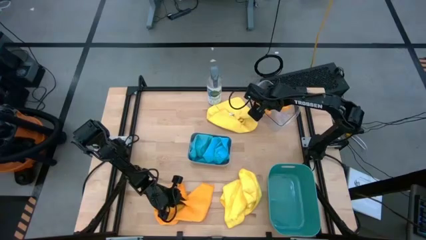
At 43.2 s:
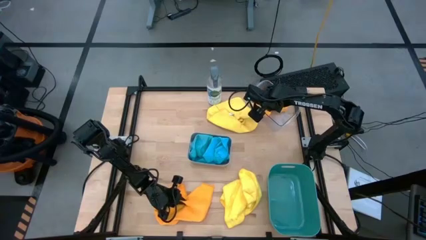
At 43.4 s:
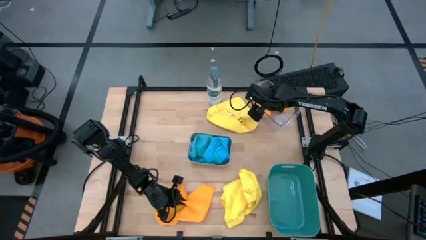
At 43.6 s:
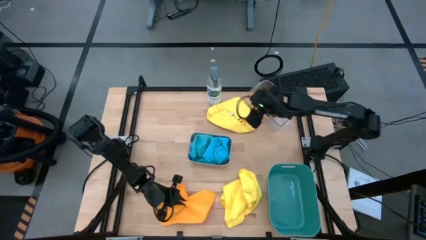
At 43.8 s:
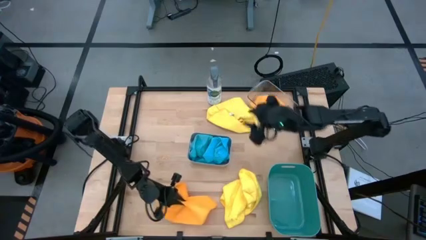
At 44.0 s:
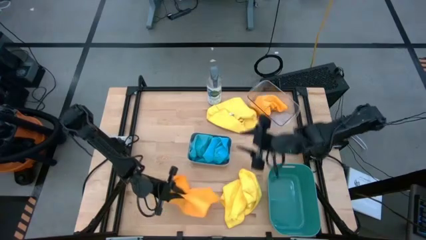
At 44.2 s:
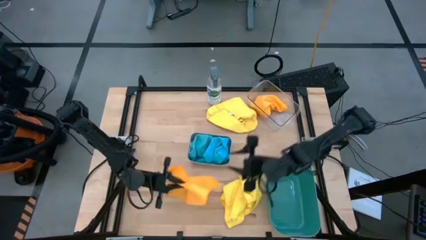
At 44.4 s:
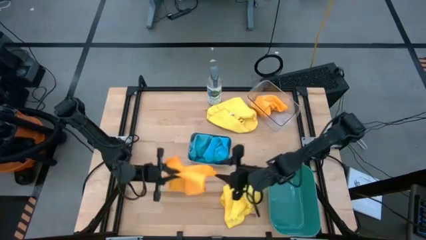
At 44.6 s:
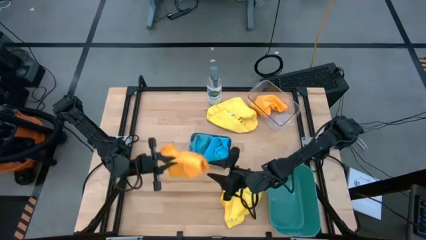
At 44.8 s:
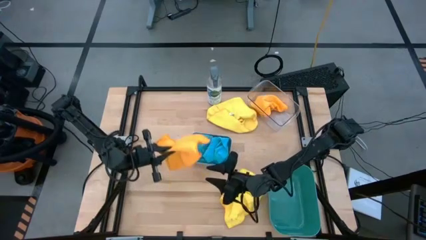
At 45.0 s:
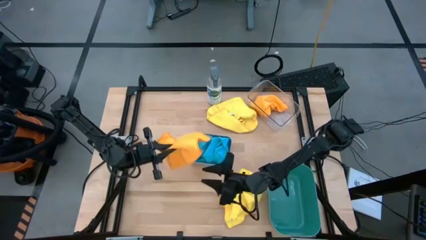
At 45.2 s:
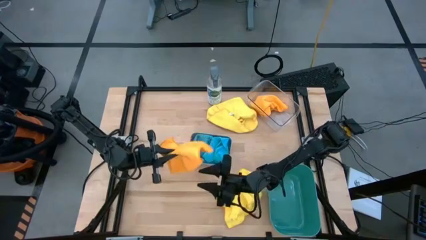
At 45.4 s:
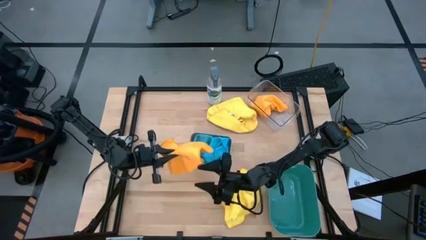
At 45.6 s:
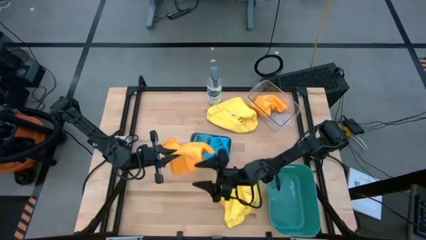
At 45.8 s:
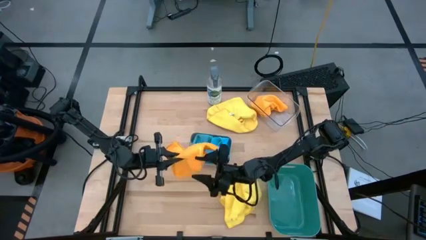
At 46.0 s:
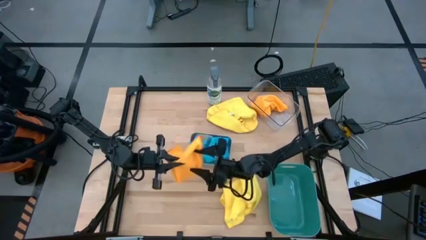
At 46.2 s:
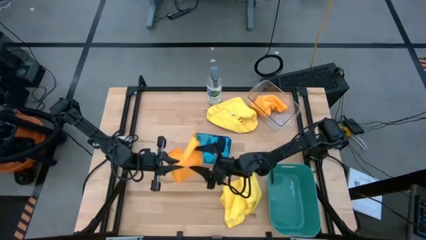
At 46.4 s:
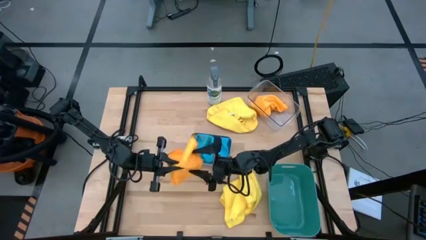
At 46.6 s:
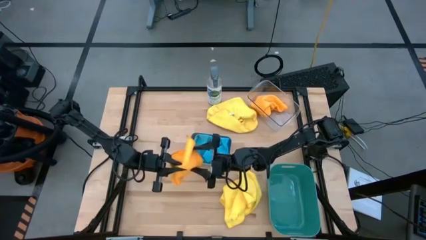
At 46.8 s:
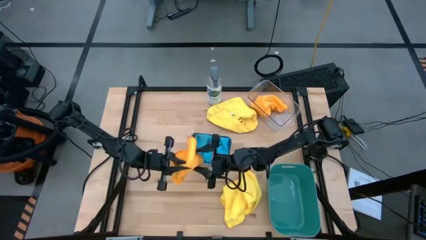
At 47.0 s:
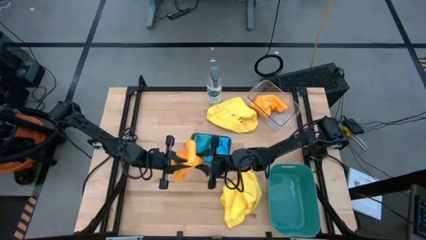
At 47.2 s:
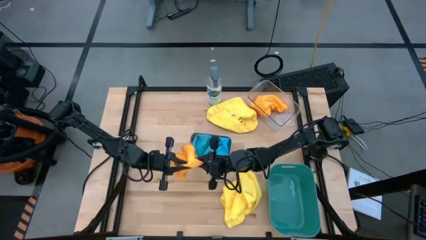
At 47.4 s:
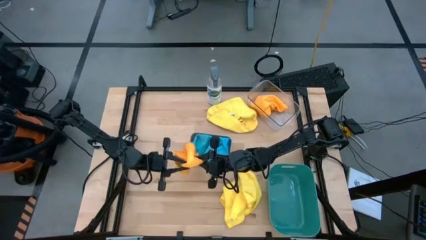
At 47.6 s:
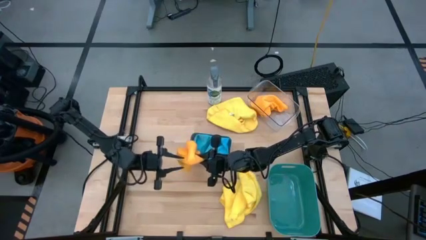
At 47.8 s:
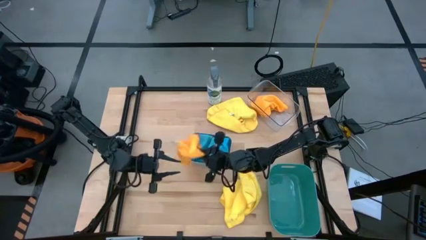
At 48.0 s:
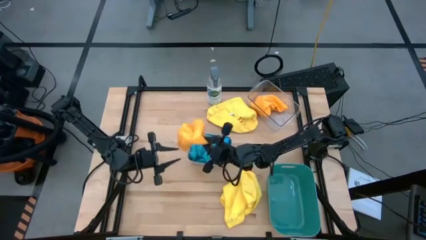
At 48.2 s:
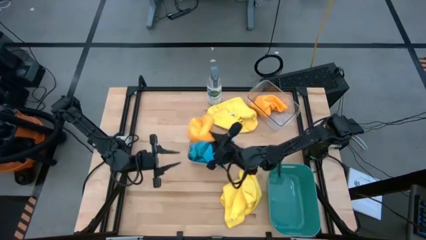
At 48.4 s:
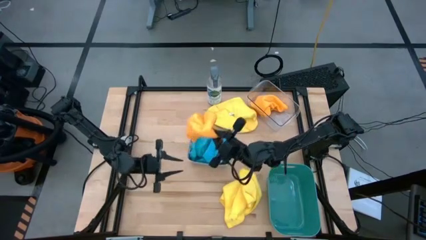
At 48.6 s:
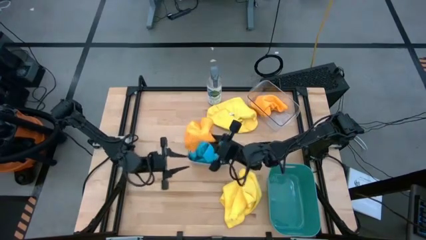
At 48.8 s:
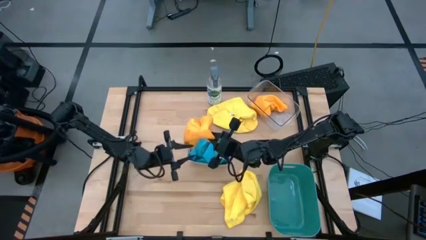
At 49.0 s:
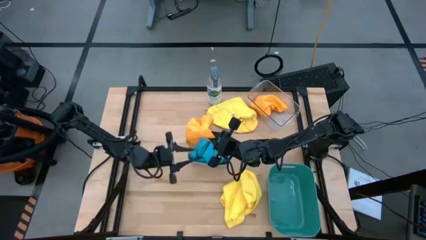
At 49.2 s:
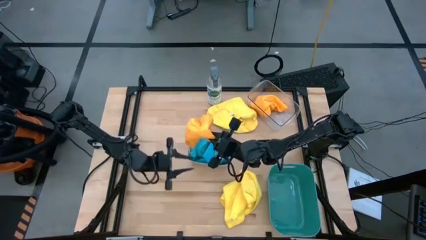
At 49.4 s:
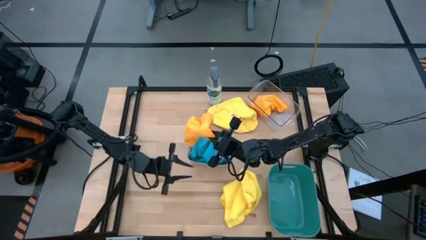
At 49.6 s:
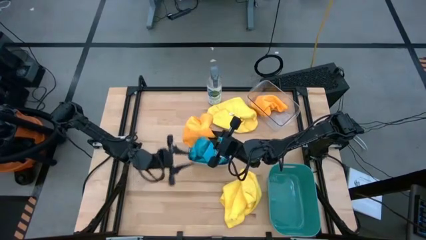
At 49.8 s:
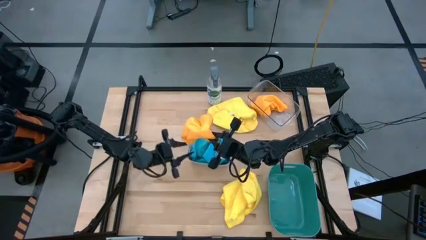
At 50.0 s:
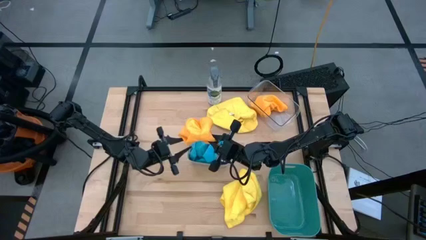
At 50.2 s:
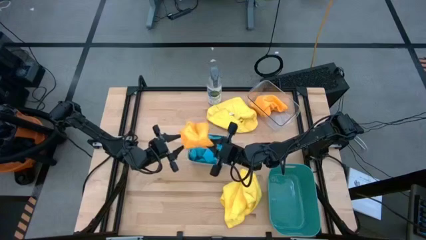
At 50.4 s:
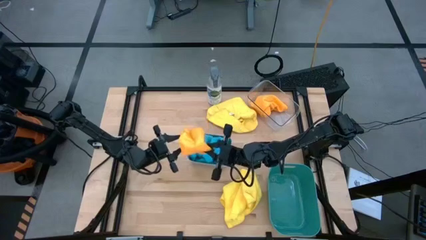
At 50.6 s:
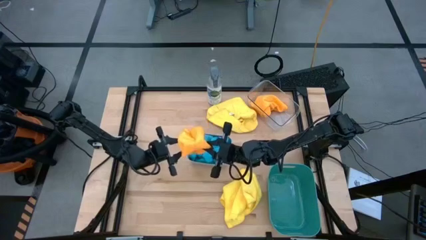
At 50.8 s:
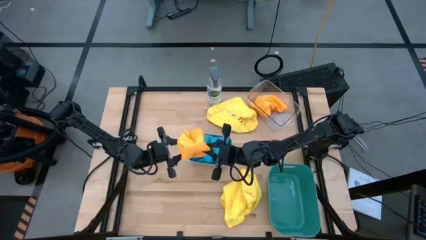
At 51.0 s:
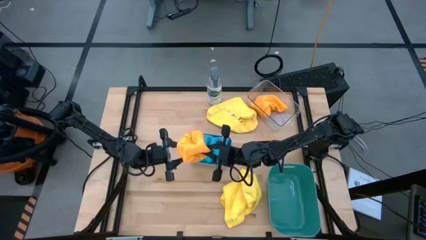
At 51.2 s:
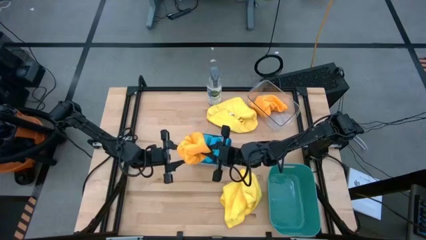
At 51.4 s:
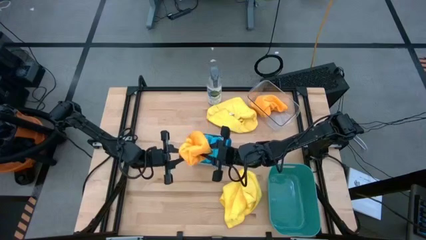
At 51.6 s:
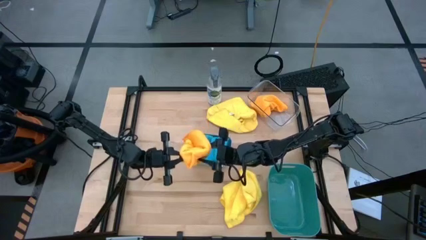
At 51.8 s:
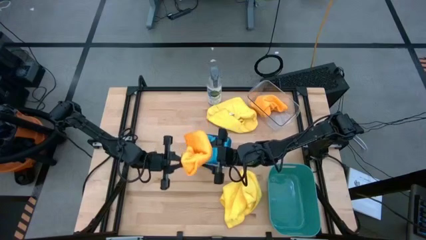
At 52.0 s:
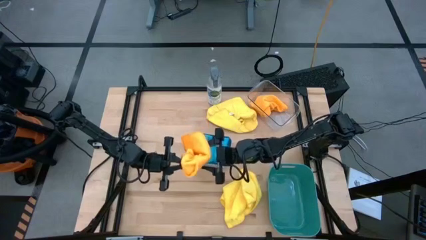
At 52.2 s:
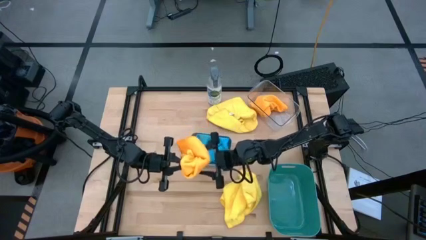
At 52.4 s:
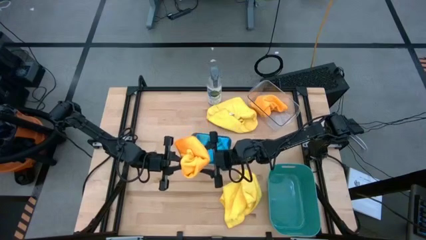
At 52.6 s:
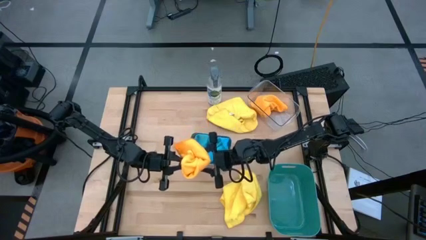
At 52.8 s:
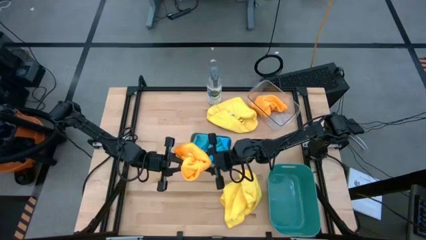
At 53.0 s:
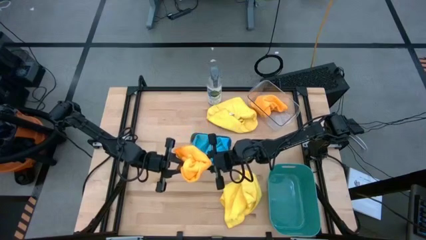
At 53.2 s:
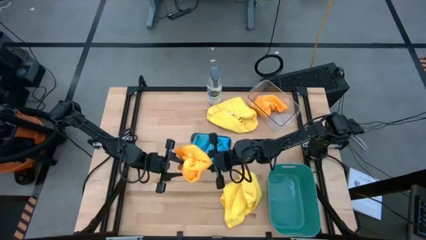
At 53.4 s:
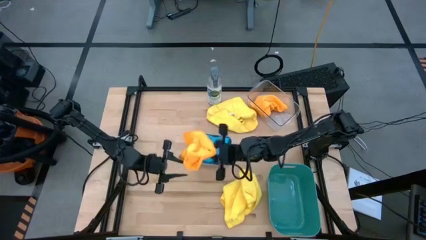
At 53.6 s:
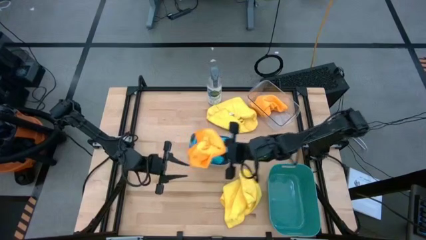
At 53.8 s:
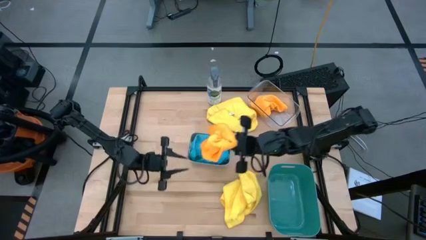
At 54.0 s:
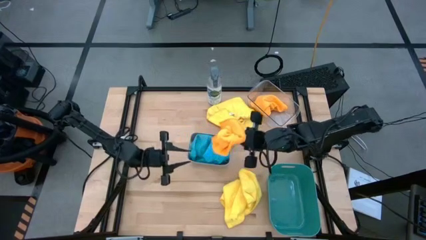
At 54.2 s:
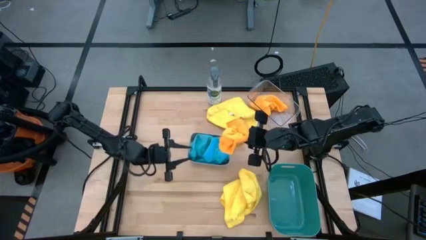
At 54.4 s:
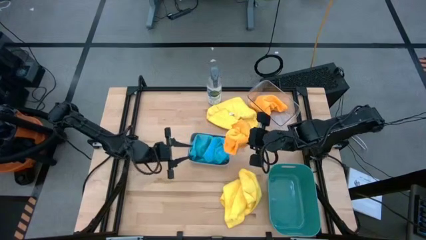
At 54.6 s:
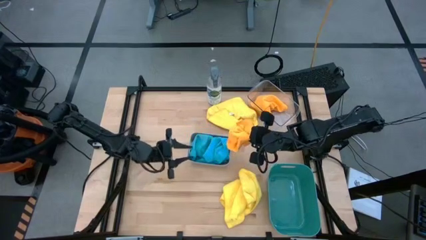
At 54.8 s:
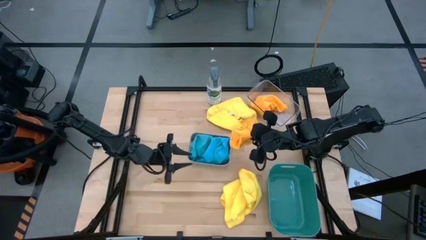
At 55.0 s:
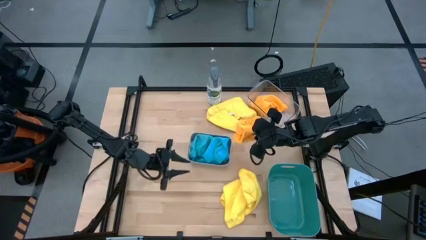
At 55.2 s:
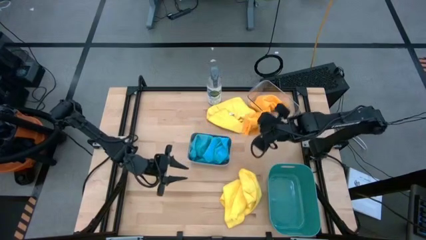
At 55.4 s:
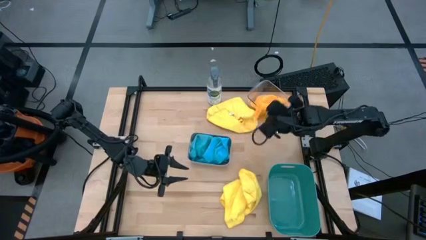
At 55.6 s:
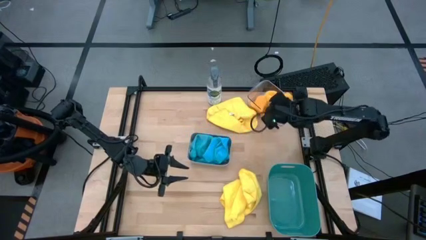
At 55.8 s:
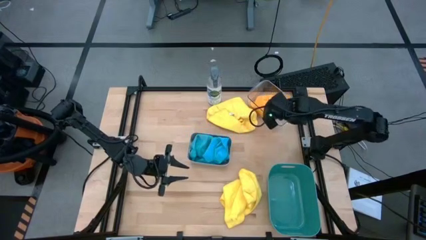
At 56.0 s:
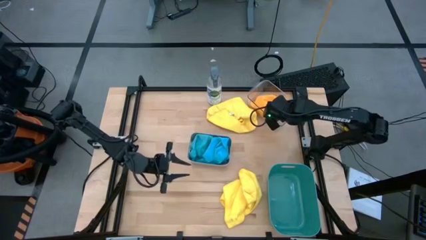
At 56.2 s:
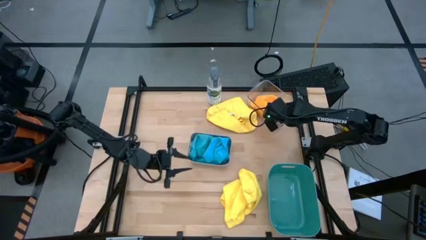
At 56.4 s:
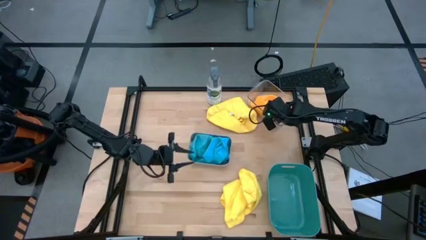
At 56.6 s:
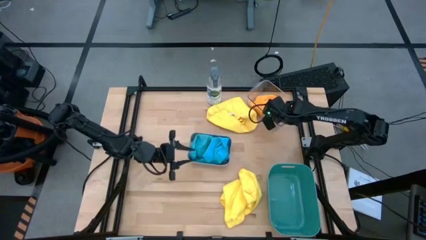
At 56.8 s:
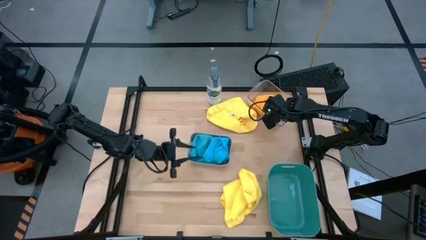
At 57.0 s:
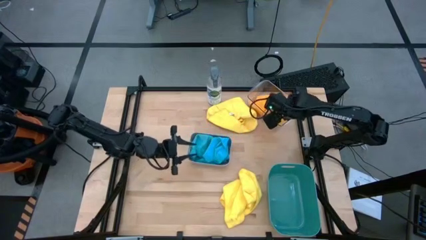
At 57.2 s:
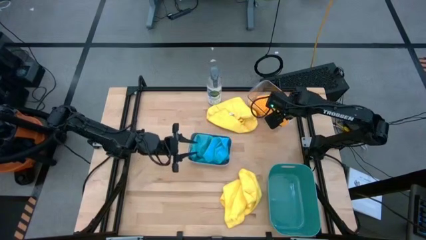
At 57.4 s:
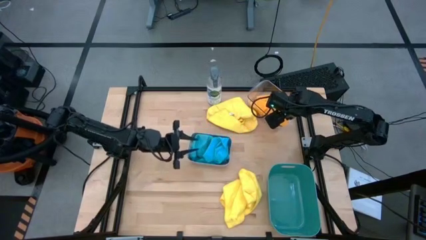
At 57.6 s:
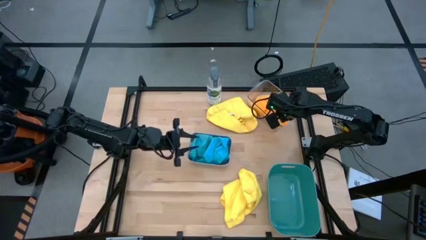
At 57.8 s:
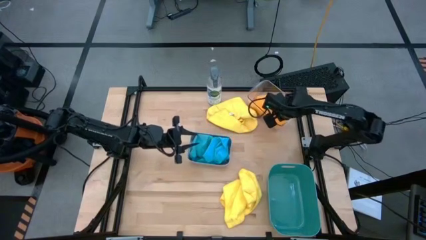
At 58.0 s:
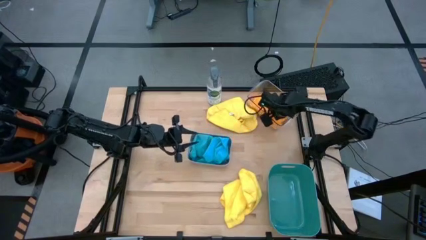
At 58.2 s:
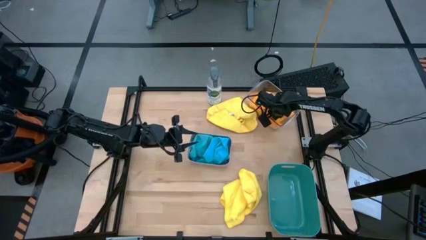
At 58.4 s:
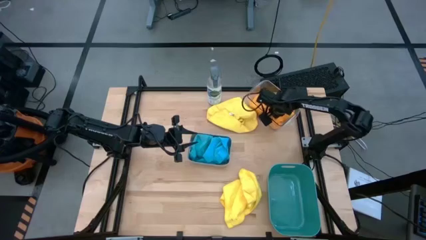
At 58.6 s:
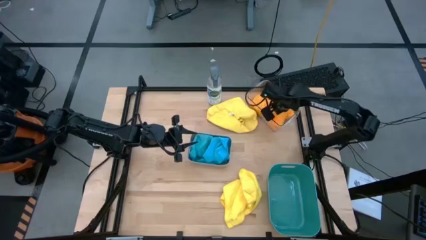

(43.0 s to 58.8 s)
Task: Sort microfiber towel by color & place in baskets
Put the orange towel in the transparent container
